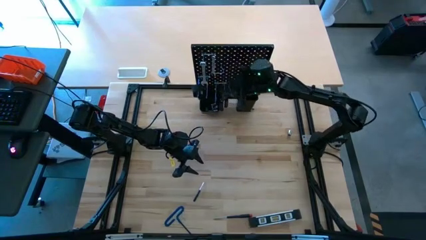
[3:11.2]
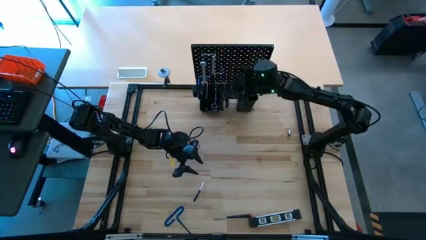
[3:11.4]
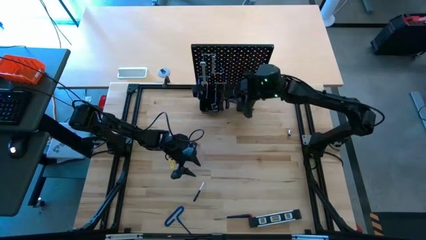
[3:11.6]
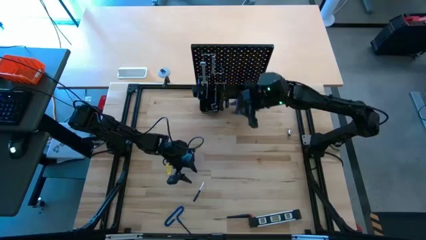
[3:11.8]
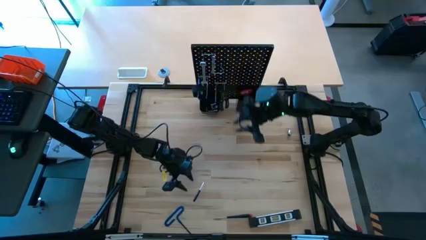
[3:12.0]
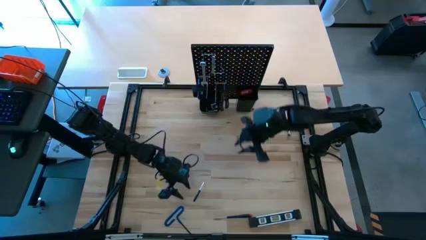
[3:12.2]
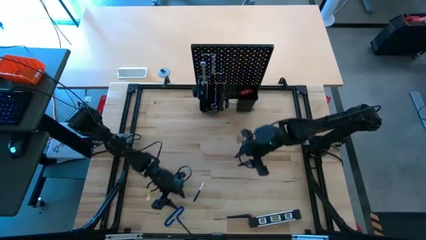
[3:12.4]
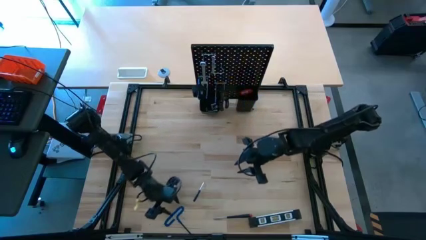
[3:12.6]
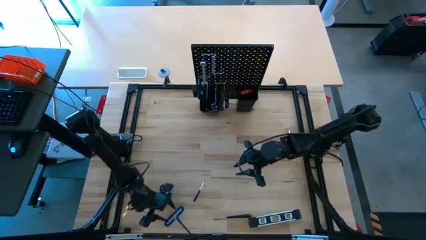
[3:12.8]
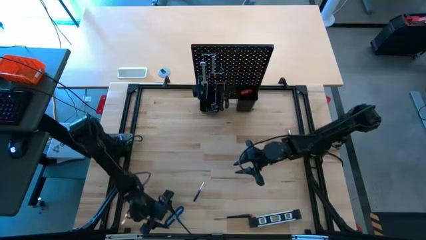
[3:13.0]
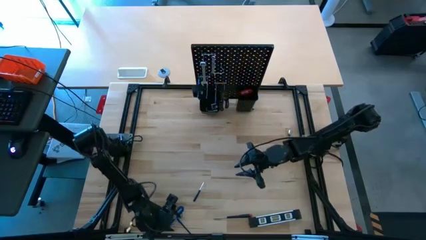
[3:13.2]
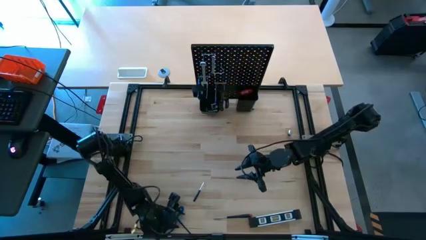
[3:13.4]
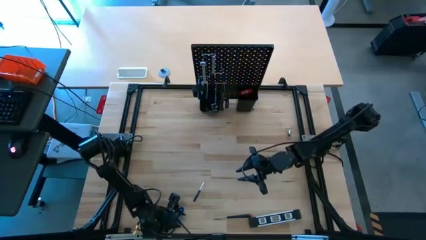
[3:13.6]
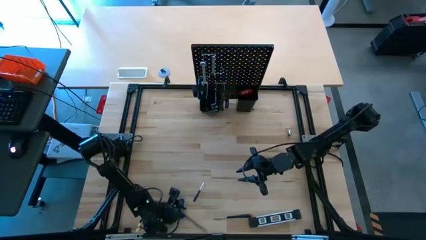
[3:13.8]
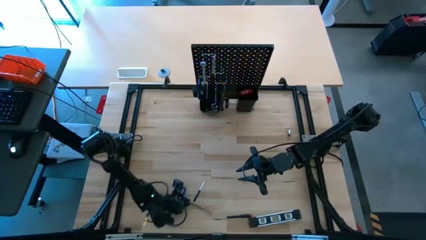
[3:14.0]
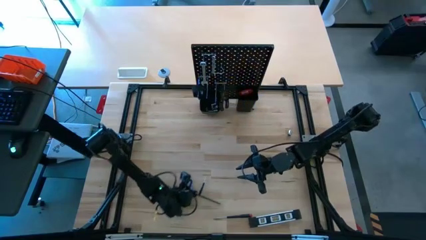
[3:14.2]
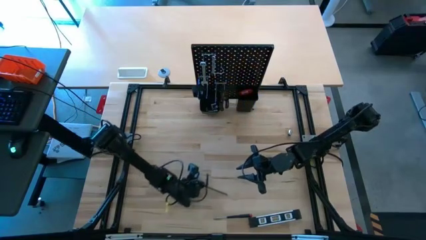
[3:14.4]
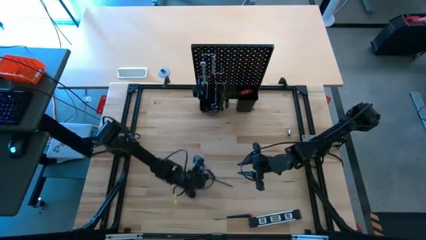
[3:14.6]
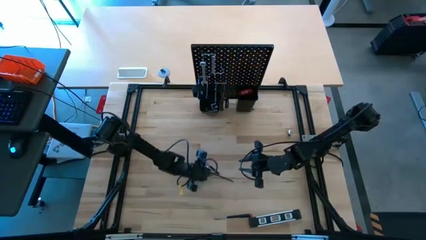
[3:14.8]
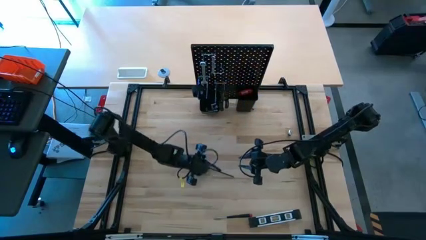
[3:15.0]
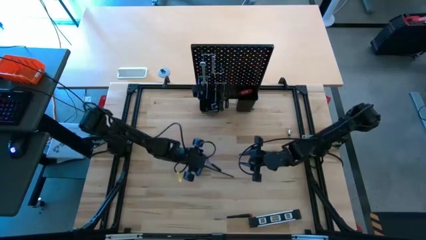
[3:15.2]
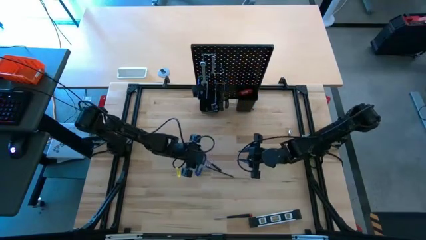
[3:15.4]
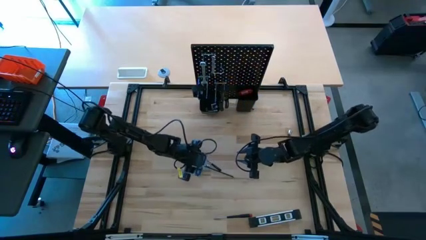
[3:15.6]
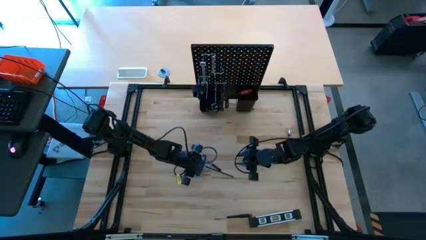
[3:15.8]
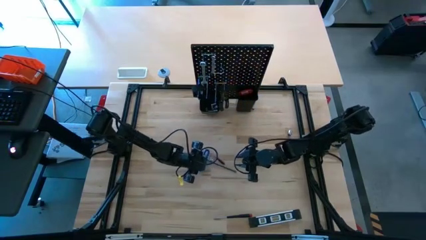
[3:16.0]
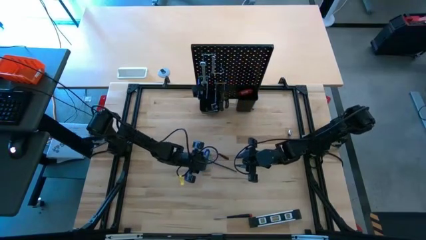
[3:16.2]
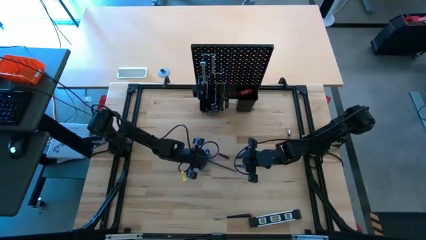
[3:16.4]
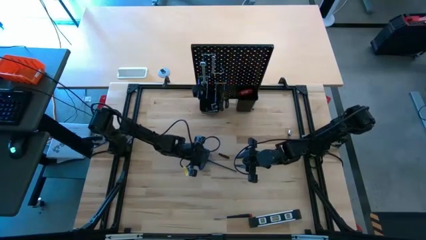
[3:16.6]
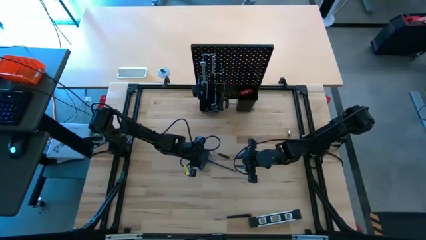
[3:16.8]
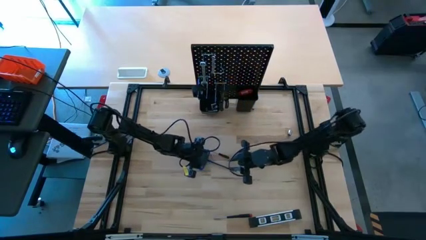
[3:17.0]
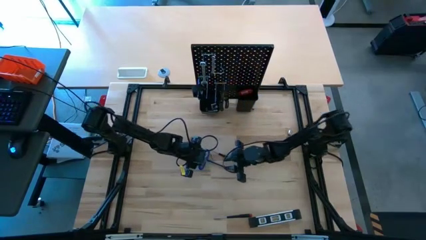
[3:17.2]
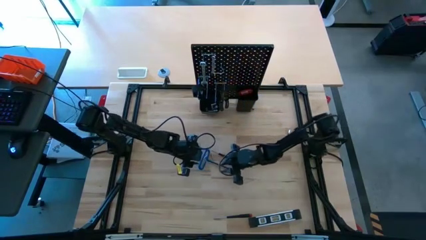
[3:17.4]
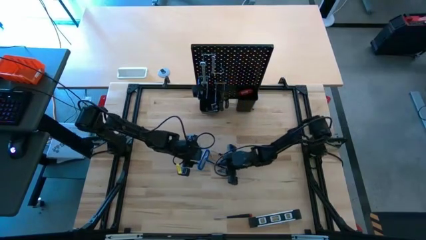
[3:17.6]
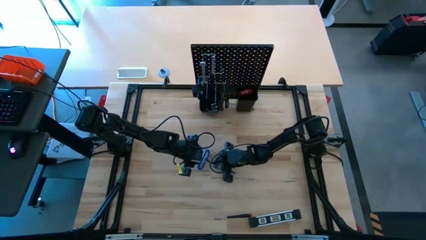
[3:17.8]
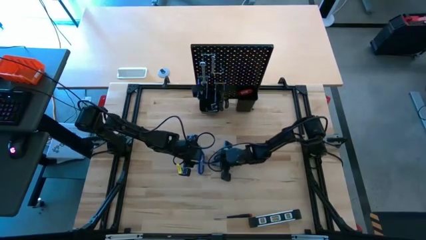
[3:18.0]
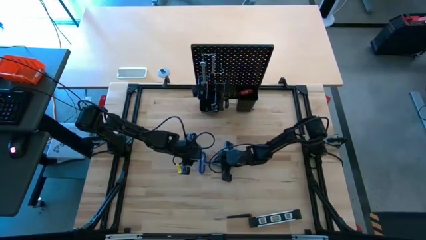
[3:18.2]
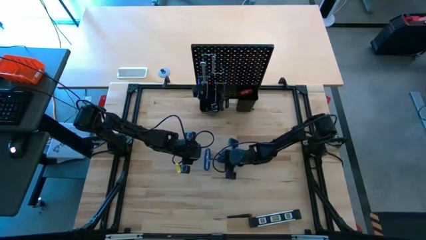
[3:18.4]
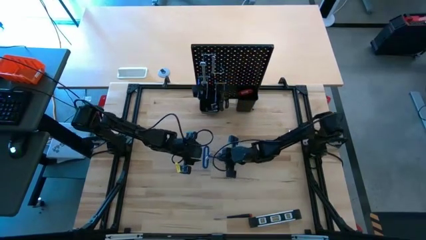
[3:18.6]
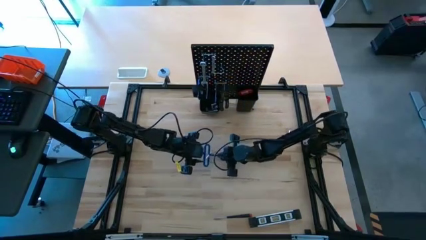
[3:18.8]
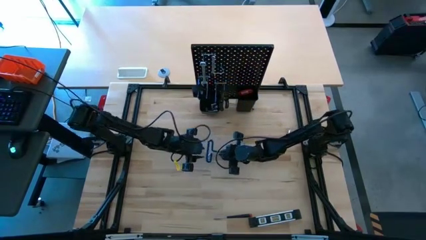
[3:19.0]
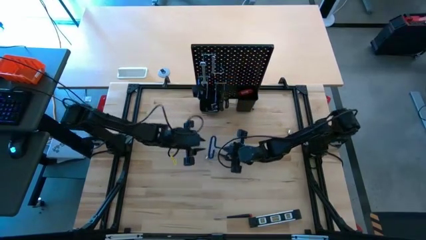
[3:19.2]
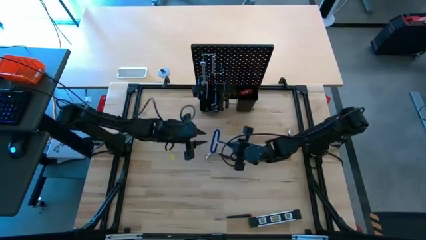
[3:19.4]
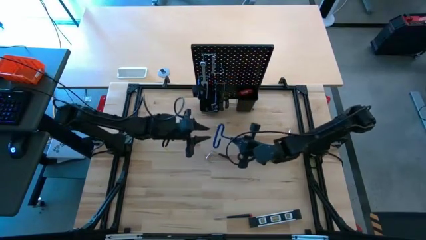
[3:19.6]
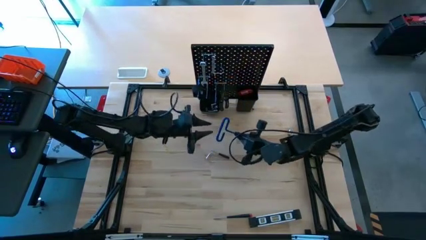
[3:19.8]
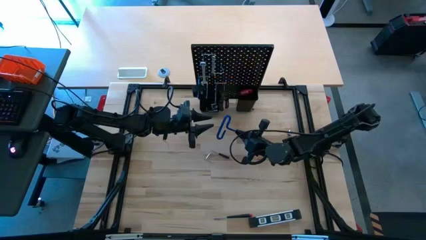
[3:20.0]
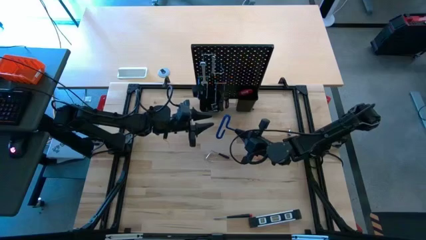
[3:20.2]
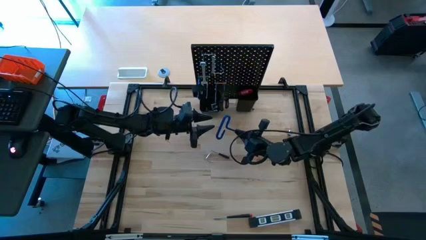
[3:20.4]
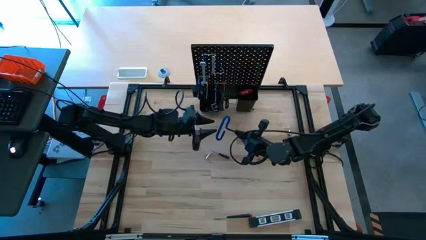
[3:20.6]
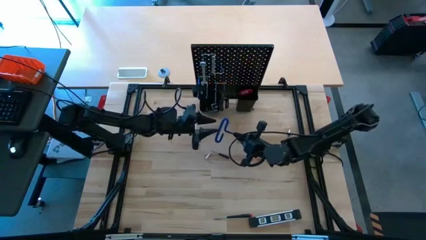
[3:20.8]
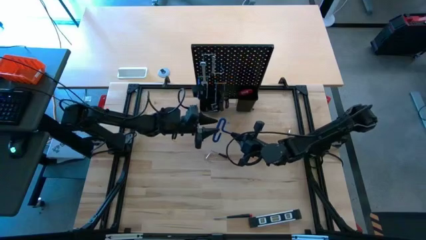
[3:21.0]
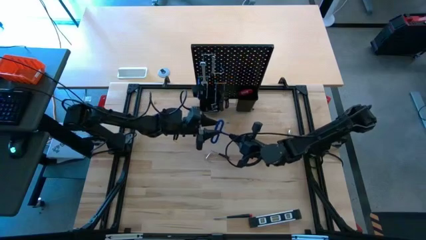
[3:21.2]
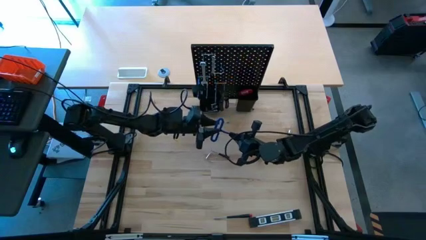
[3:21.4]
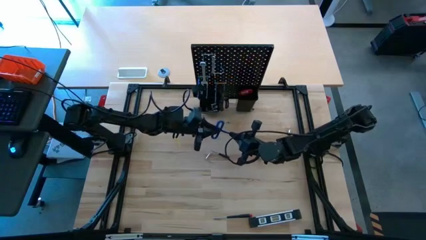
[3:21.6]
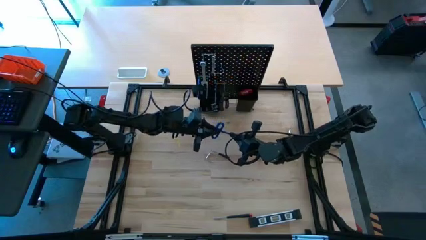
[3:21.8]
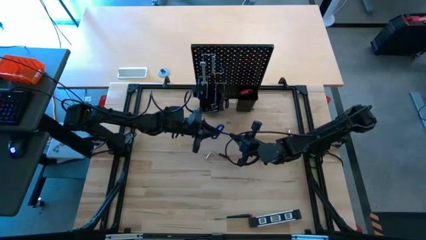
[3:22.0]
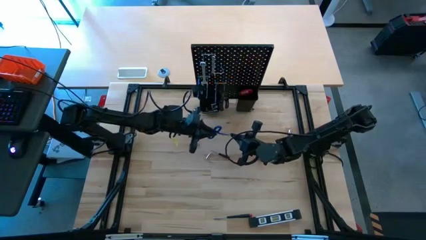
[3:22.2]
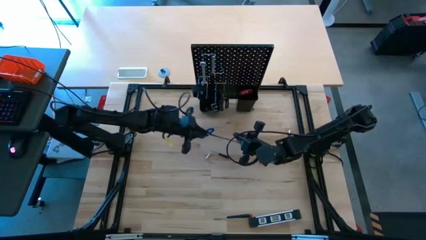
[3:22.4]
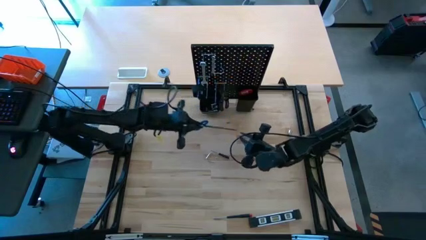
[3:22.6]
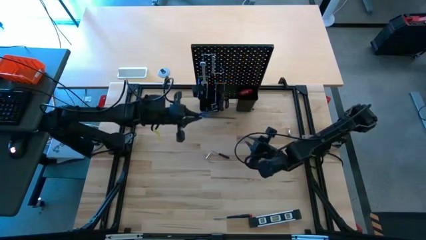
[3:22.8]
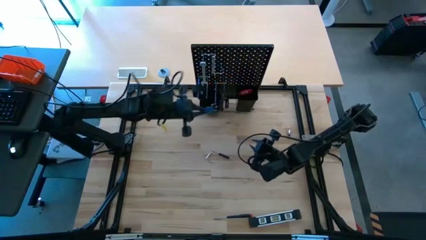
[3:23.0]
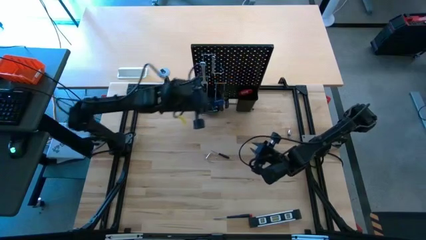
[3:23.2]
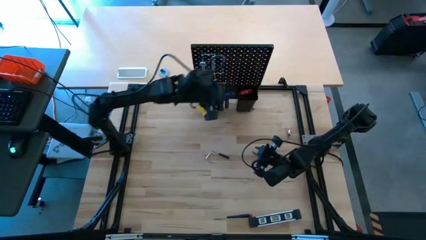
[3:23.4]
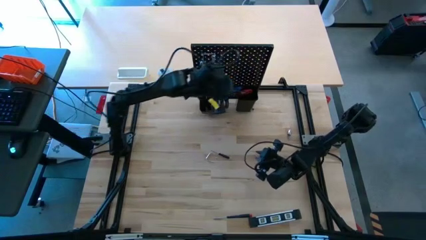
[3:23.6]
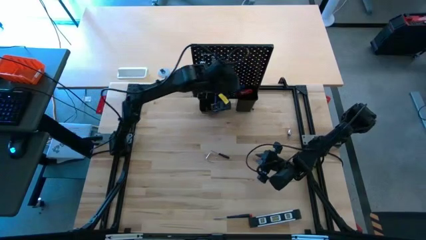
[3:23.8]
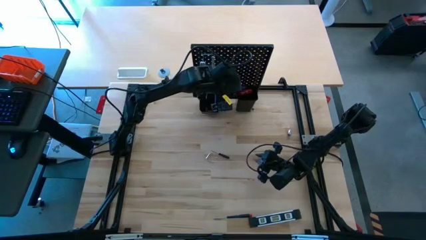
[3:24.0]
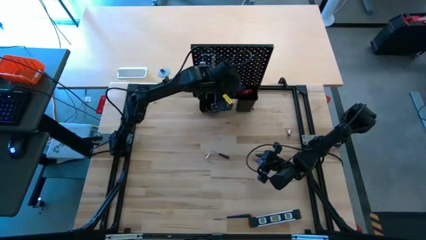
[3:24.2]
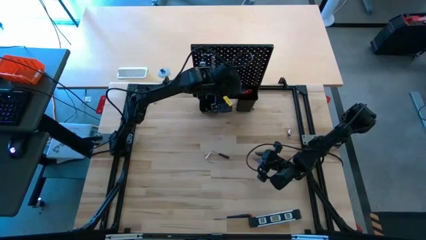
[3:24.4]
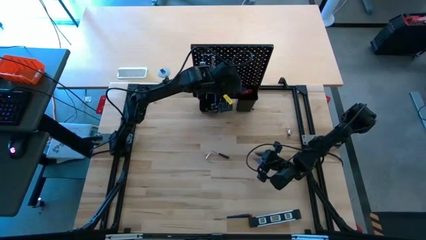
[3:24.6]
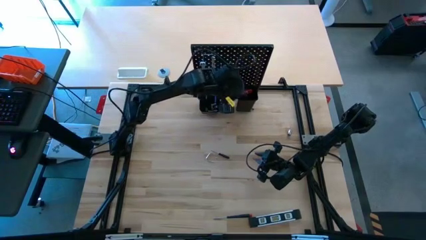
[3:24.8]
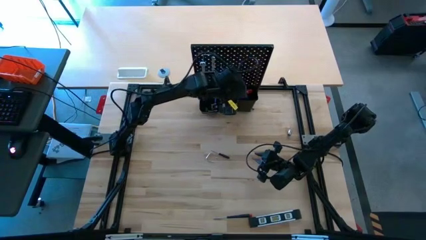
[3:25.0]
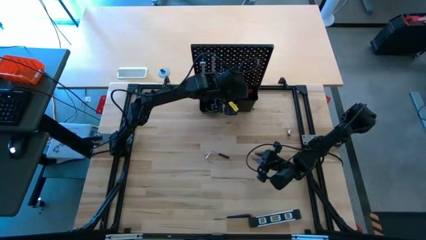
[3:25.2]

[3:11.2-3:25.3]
Task: Hang tools onto peg board
Put the pick tool into the right bin on the pegboard

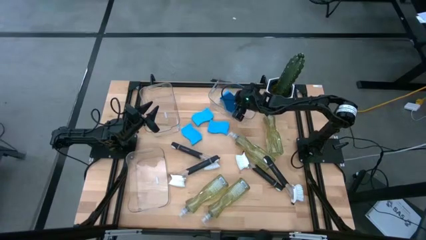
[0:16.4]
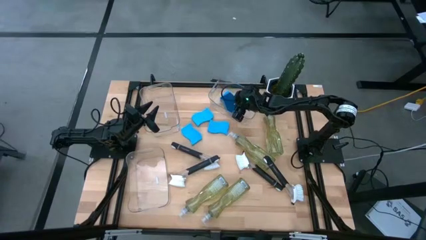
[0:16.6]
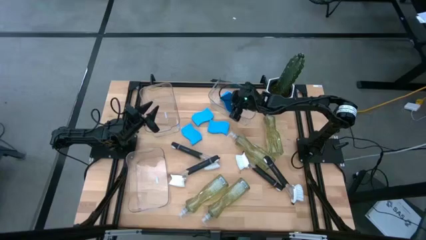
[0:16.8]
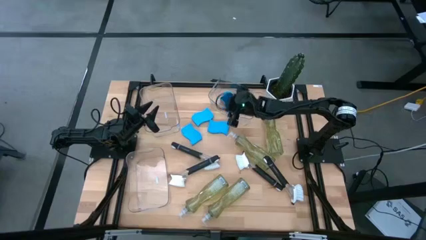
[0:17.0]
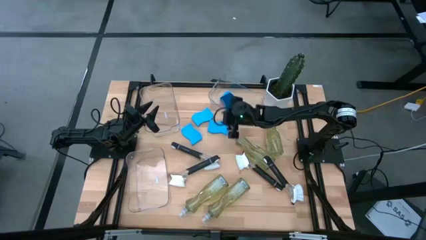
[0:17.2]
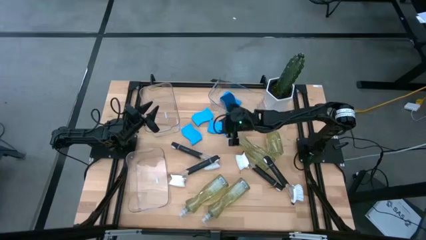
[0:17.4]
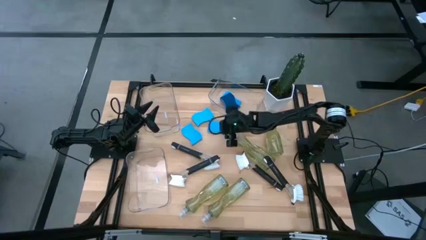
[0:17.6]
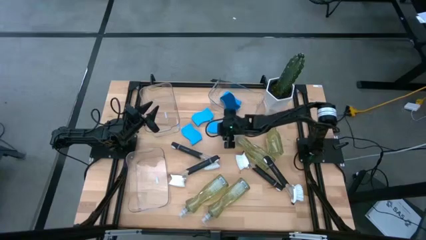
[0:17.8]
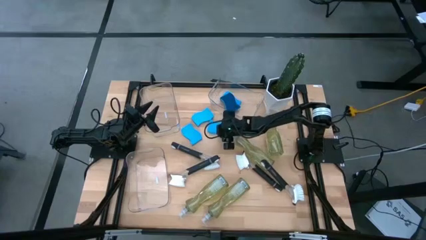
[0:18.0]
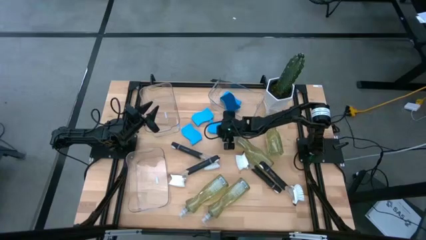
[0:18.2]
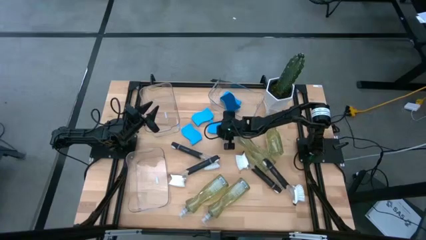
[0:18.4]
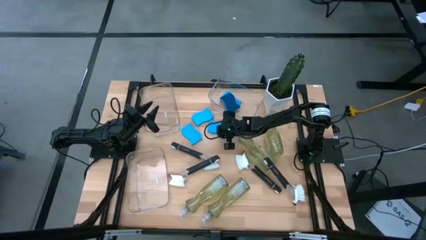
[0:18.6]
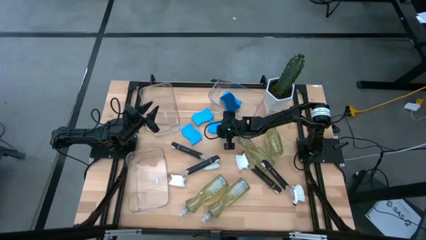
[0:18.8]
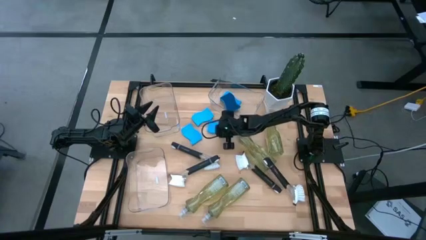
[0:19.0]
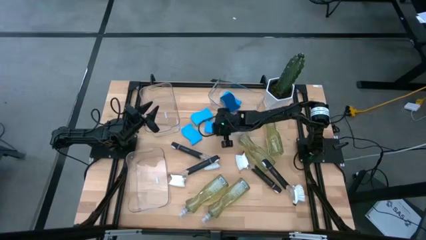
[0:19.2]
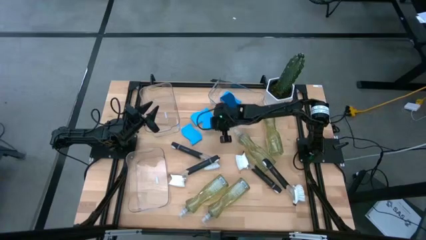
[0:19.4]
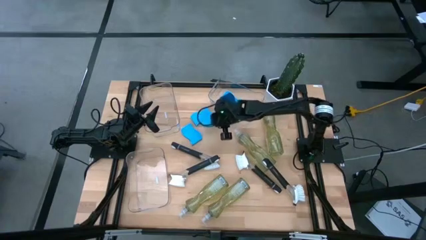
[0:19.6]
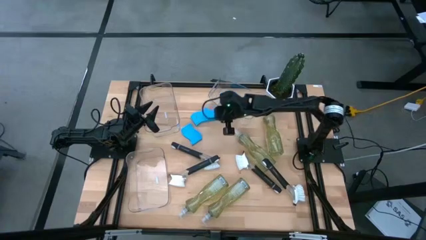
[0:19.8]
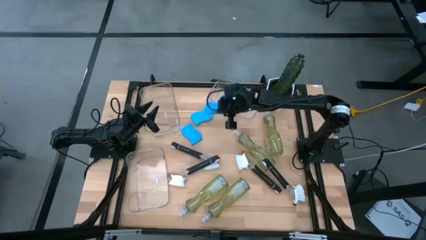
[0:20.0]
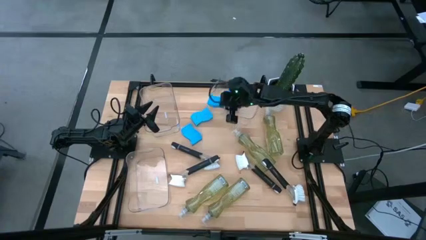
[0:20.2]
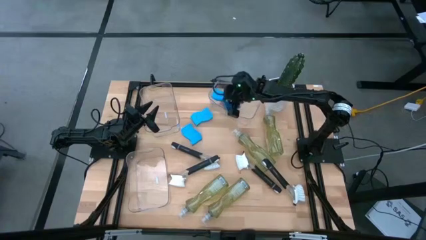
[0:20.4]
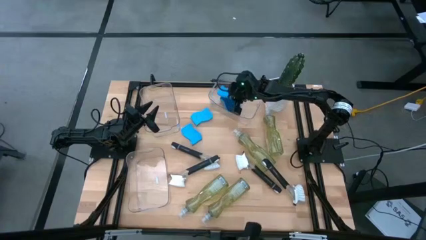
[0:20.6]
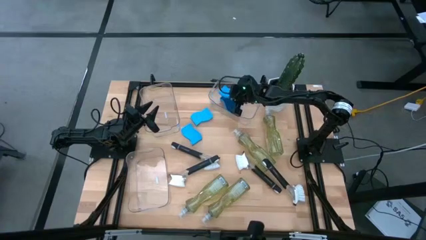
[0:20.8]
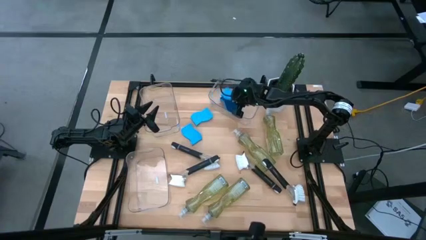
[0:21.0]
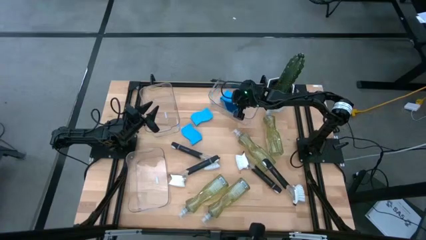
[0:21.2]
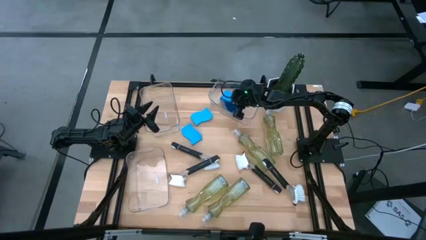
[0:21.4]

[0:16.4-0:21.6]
Task: Pick & Place Kitchen Sink Supplies
Put the blue sponge into the top right transparent bin
